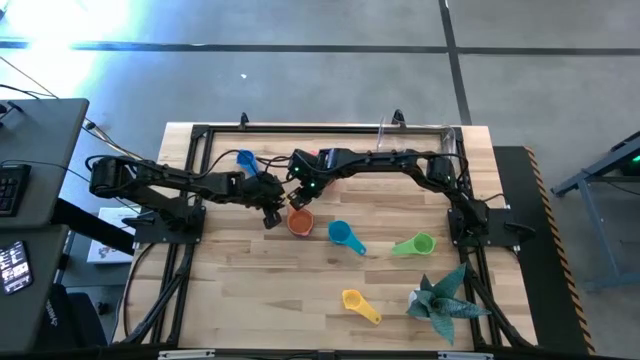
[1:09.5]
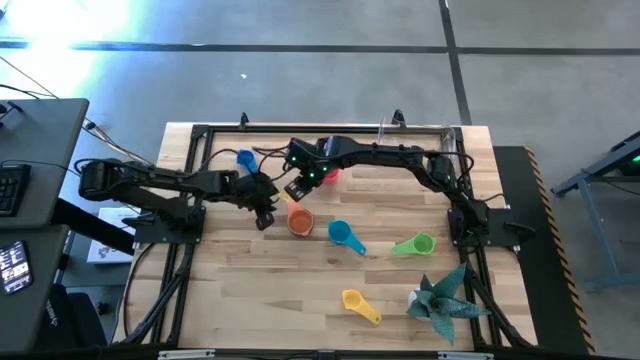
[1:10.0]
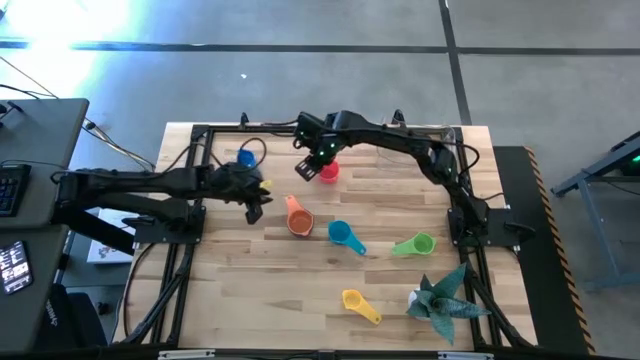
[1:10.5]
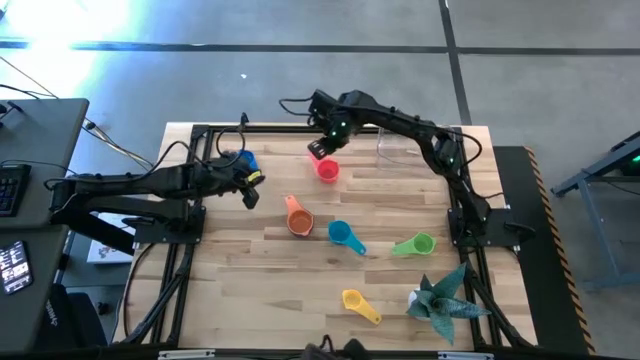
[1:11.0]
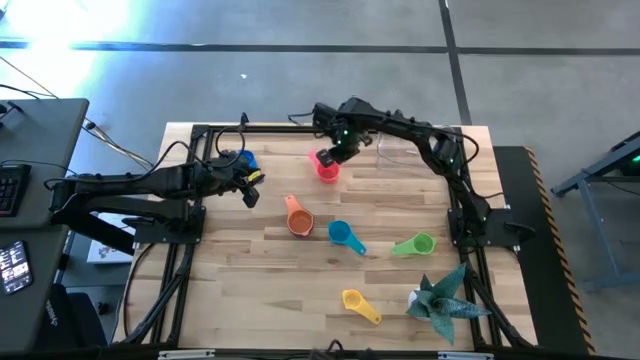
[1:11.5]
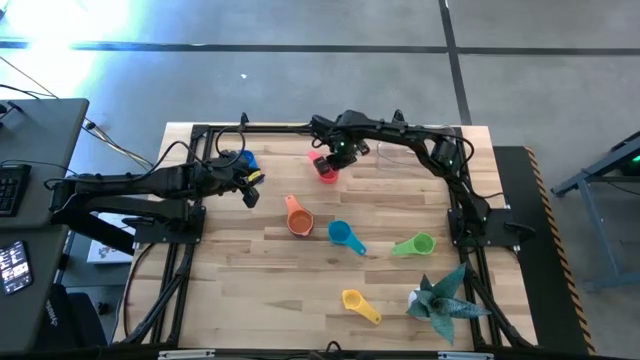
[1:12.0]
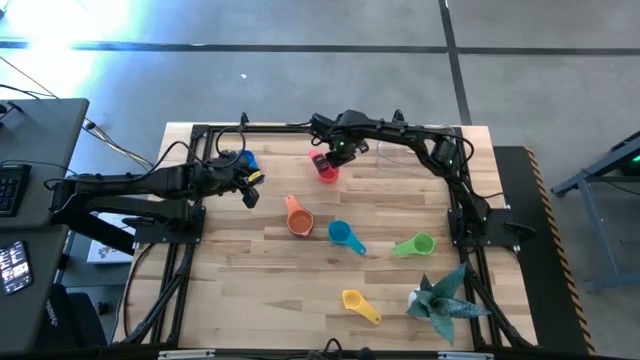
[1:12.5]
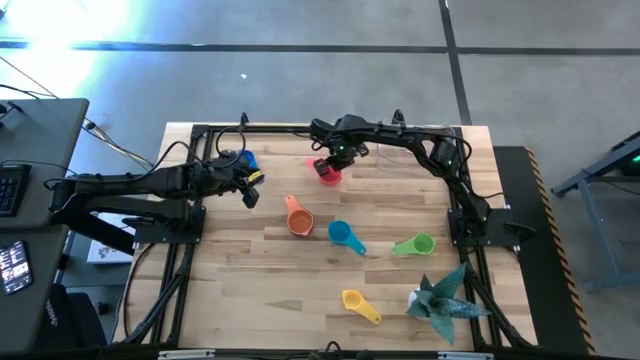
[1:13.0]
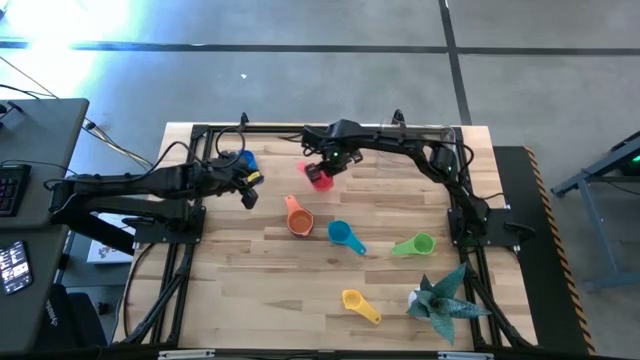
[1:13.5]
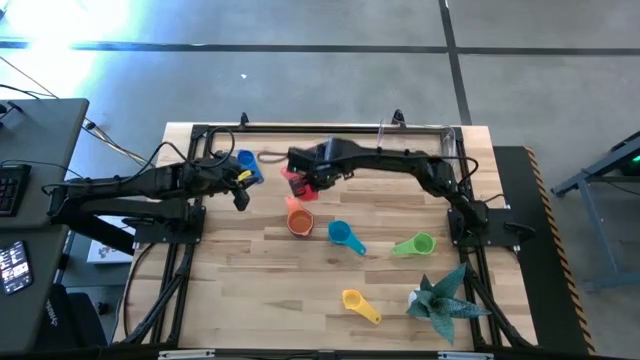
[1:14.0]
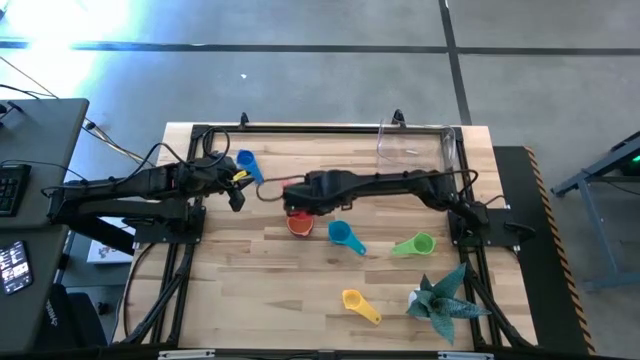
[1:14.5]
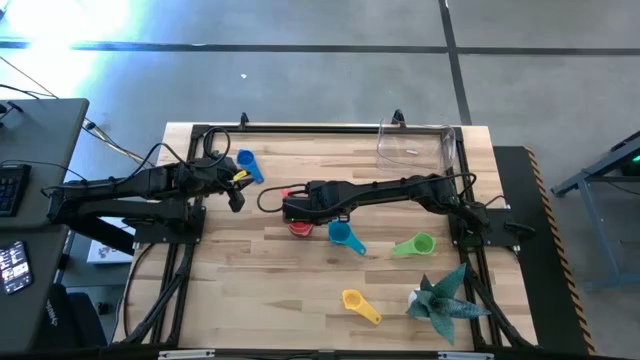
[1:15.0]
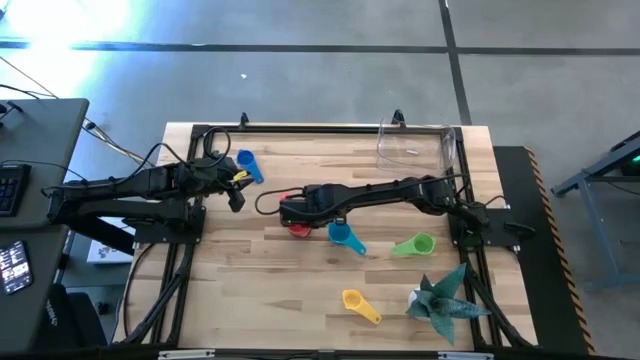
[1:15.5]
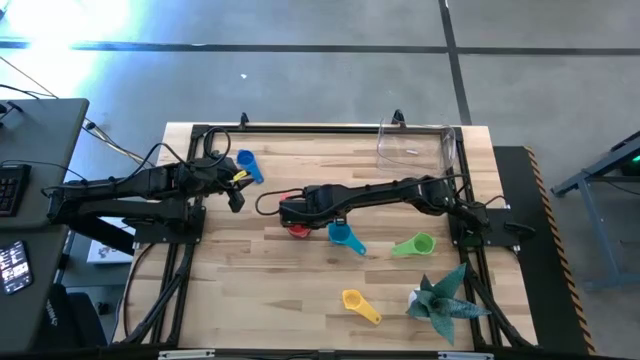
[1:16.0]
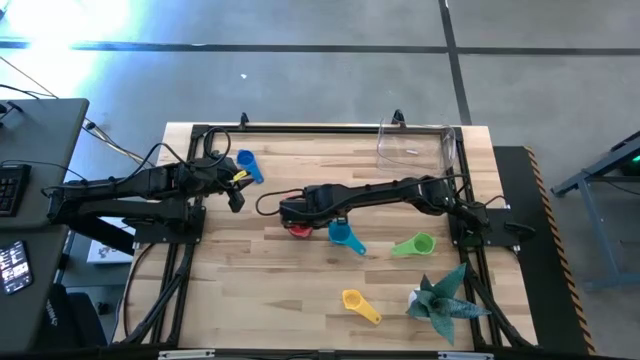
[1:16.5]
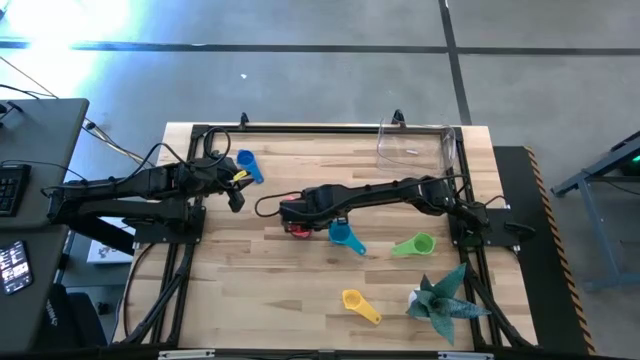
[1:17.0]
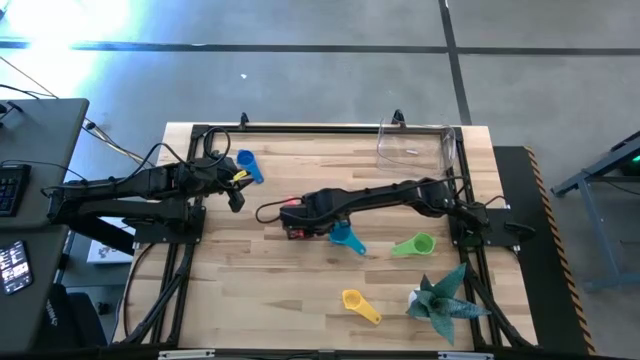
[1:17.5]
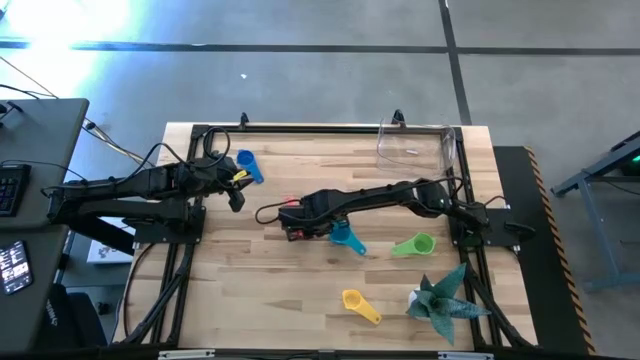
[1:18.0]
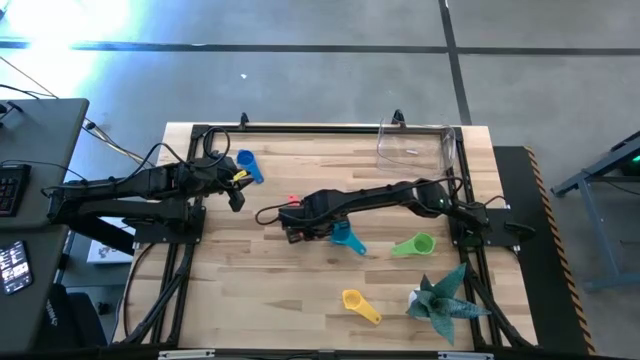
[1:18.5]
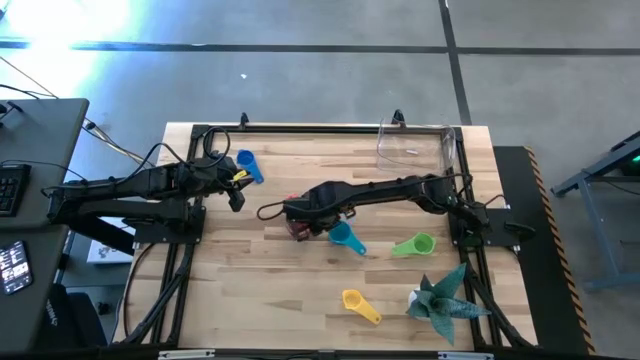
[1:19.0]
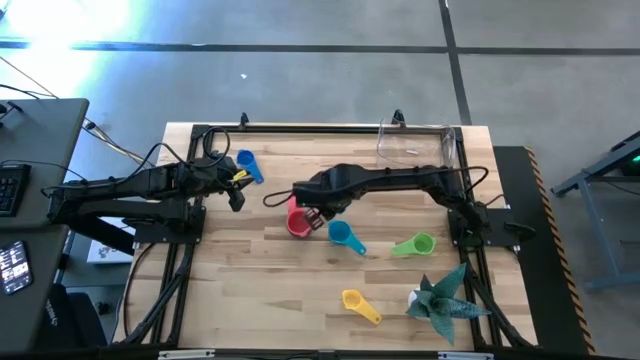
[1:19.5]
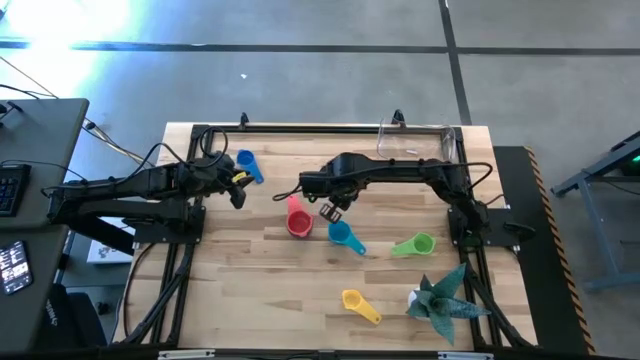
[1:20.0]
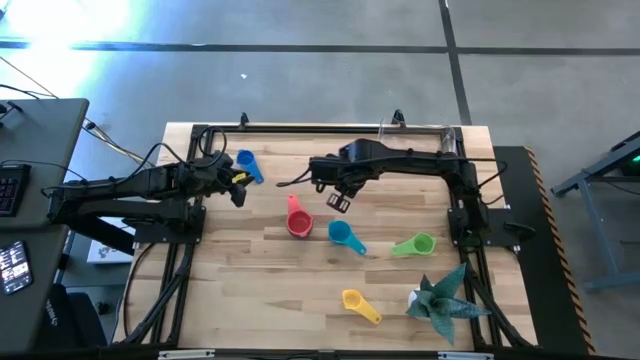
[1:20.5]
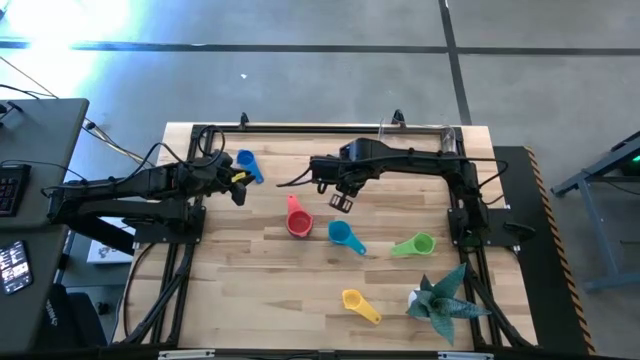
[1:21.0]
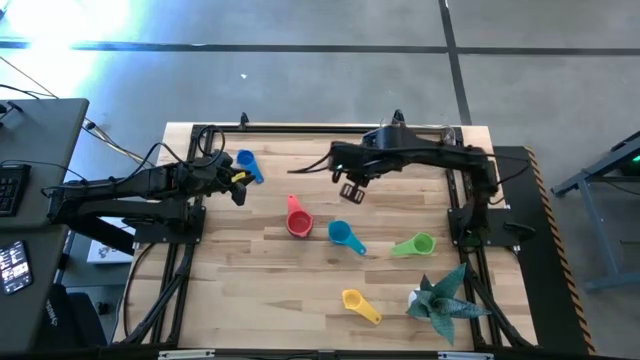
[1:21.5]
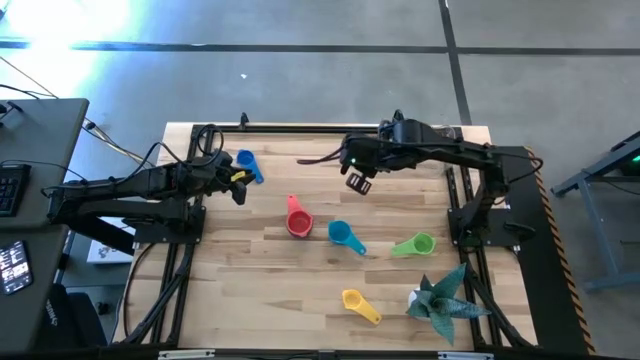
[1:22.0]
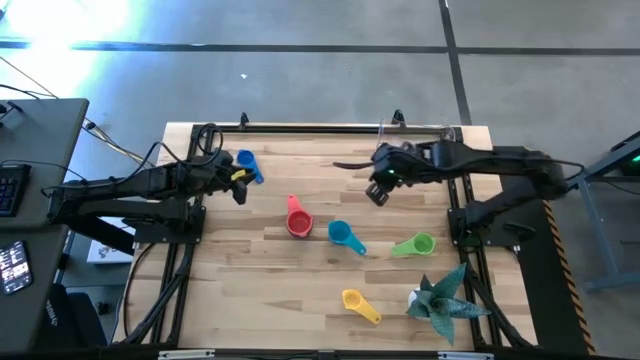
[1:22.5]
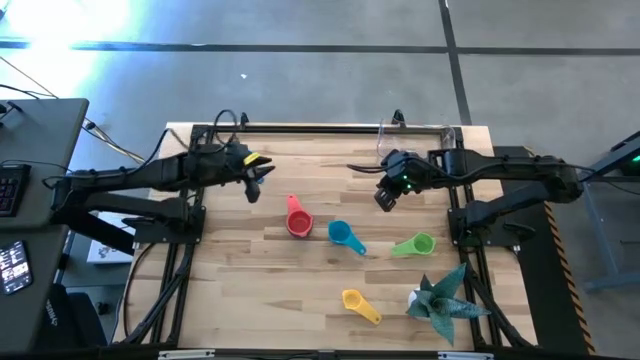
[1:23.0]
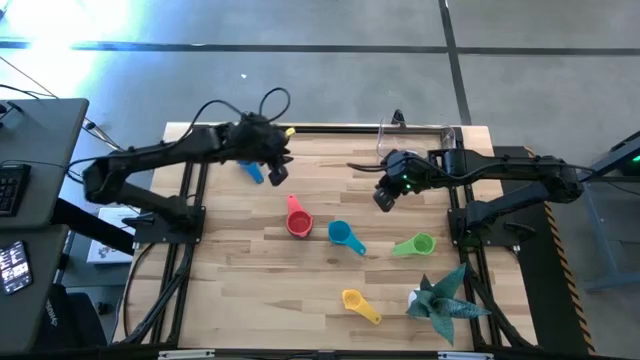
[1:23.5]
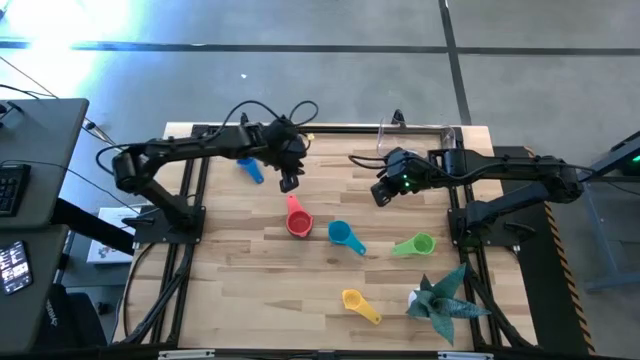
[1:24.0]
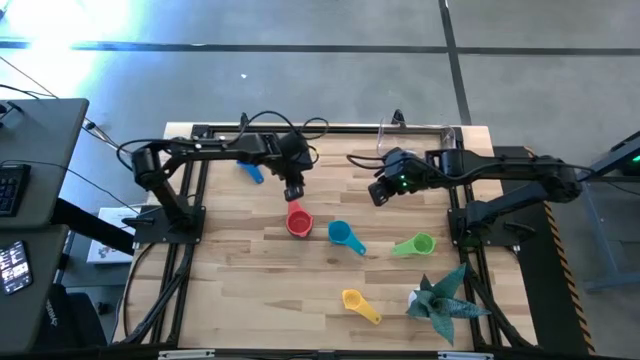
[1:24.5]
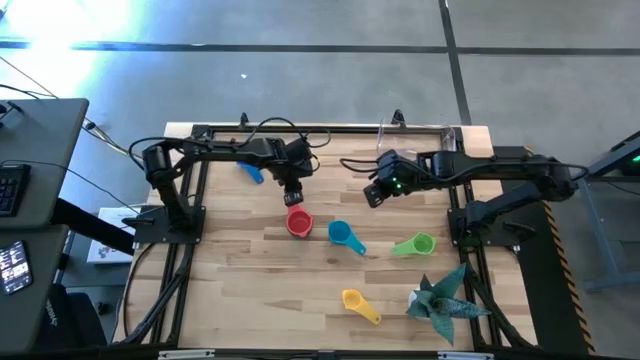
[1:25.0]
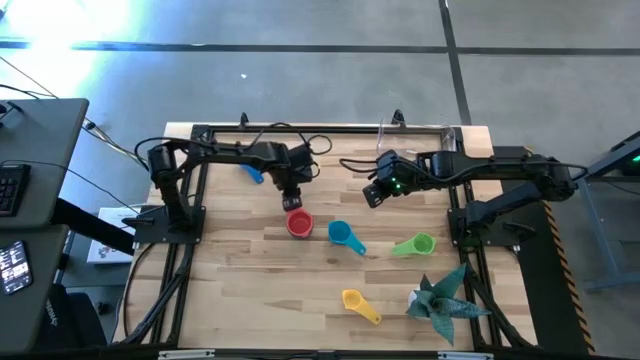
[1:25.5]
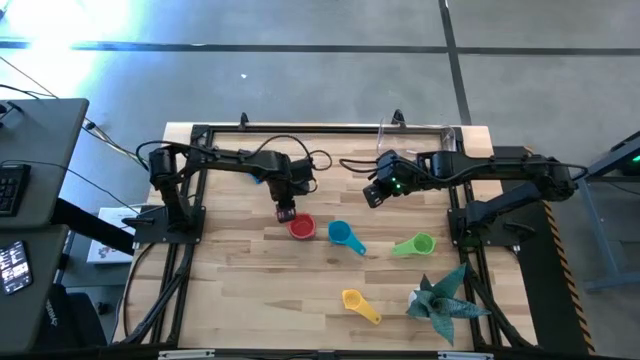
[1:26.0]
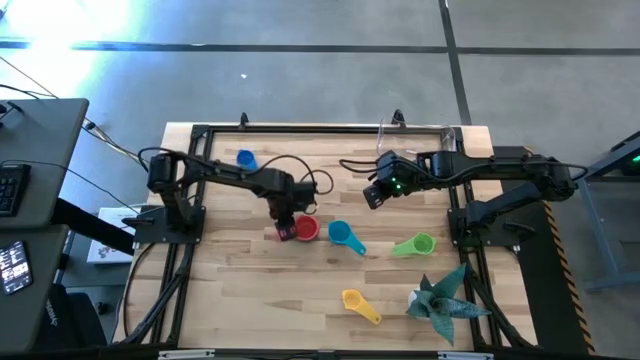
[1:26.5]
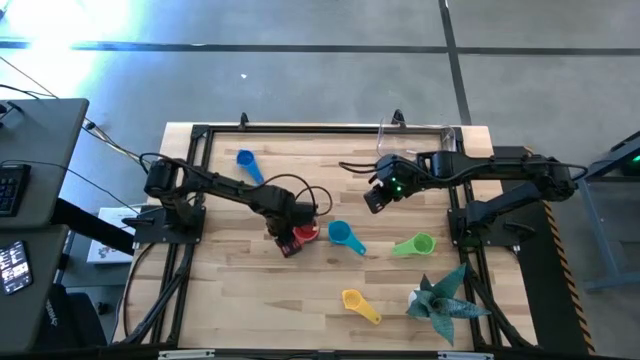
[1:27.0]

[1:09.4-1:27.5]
Task: Nest measuring cups in basket
Stack the red measuring cup on top of the orange measuring cup

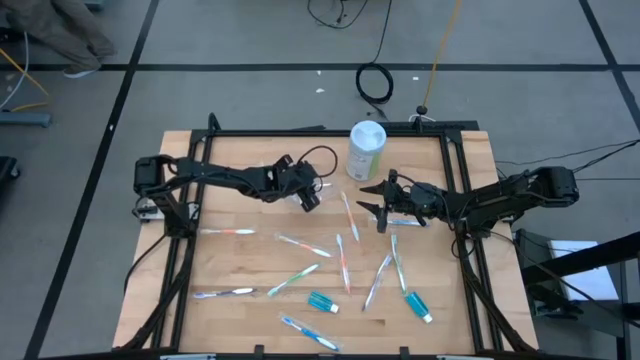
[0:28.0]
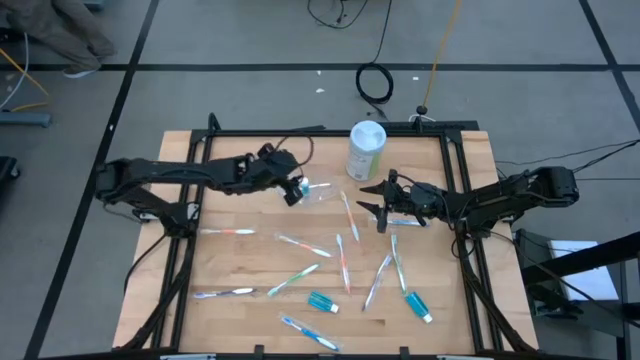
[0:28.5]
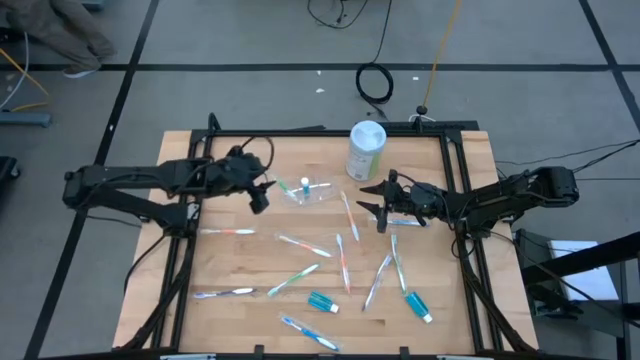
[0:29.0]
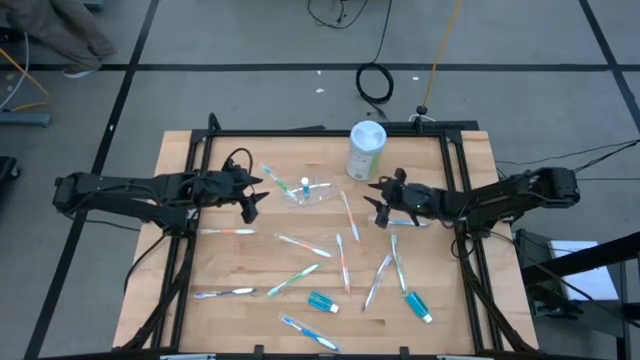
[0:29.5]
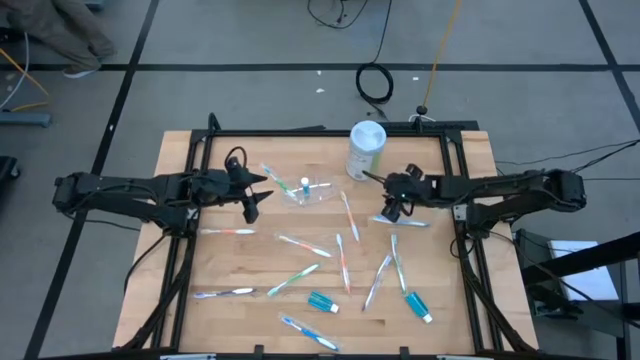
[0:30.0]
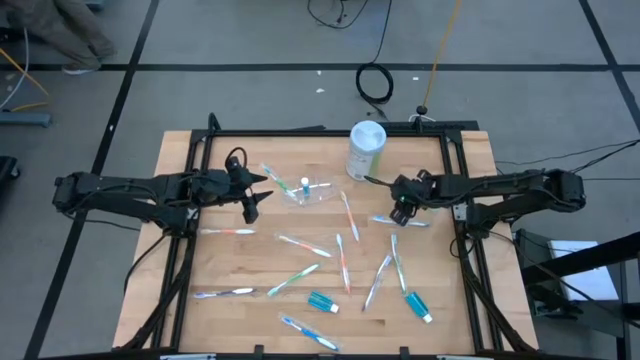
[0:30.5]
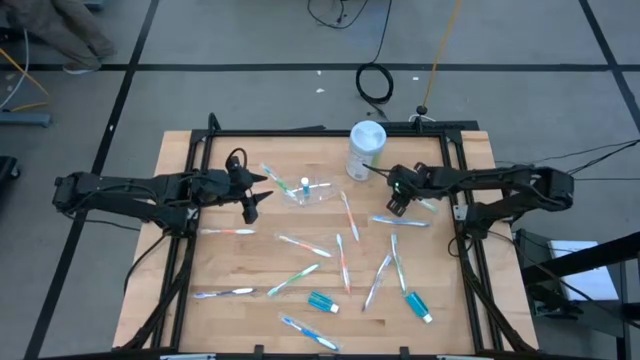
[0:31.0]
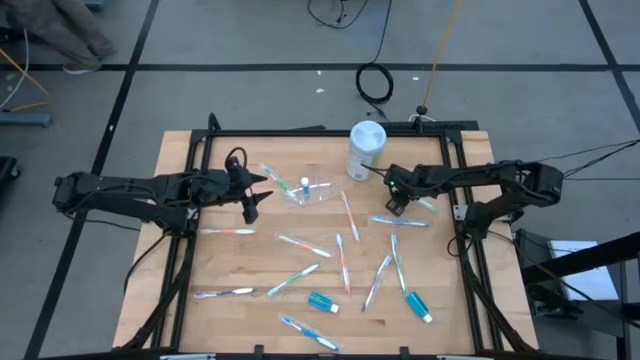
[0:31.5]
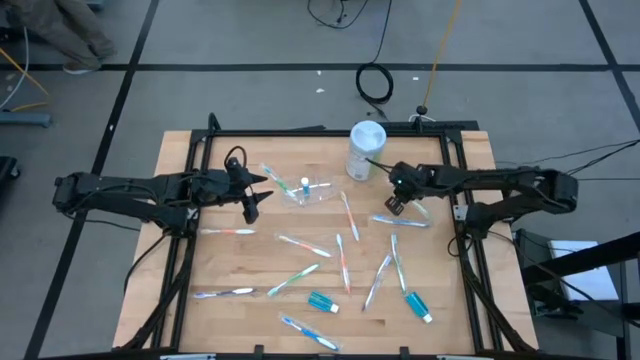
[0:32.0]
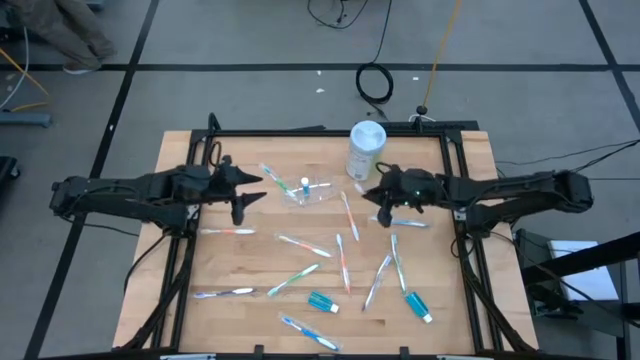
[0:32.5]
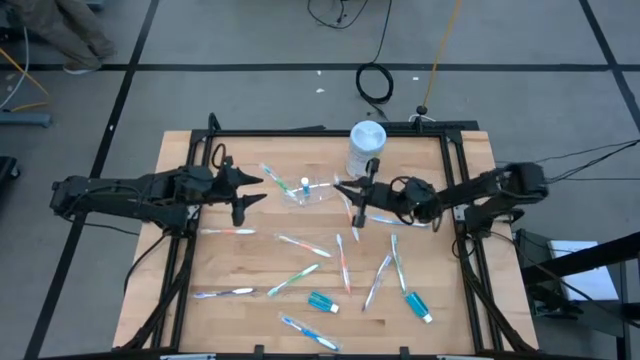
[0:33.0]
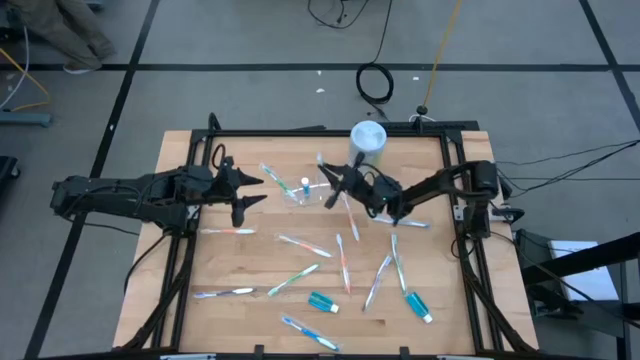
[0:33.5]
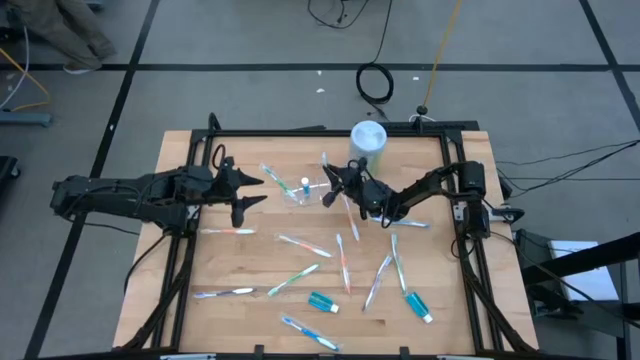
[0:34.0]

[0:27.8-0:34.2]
Task: Pick & Place toothbrushing station
Put the green toothbrush into the transparent organizer
